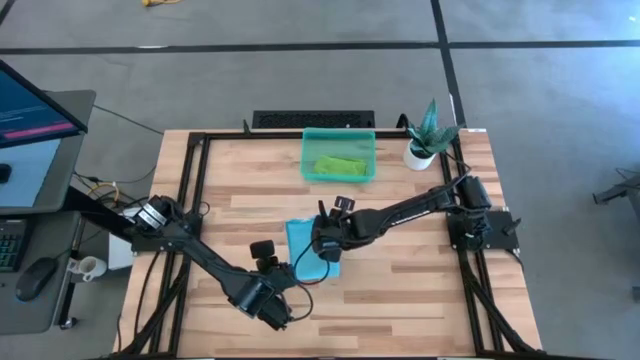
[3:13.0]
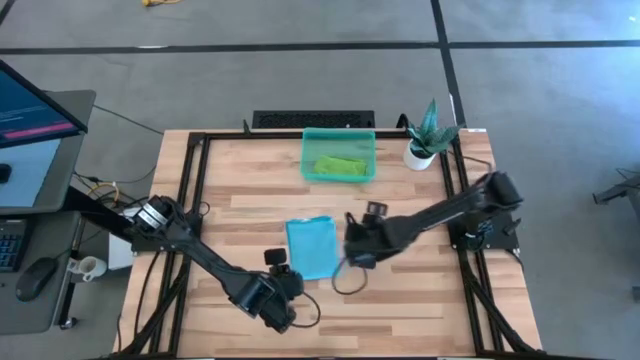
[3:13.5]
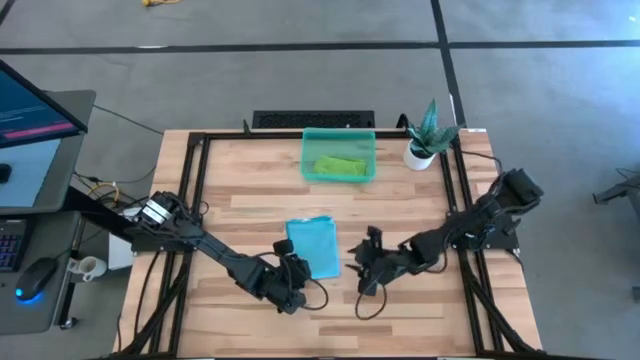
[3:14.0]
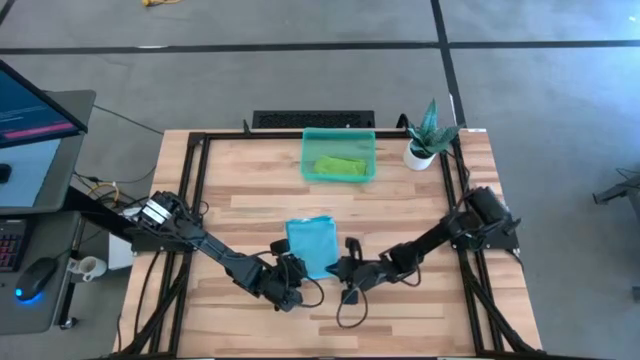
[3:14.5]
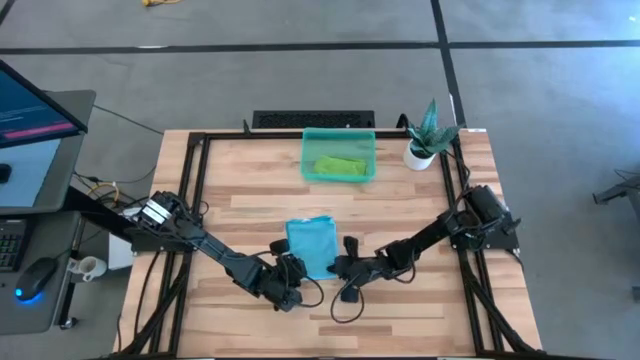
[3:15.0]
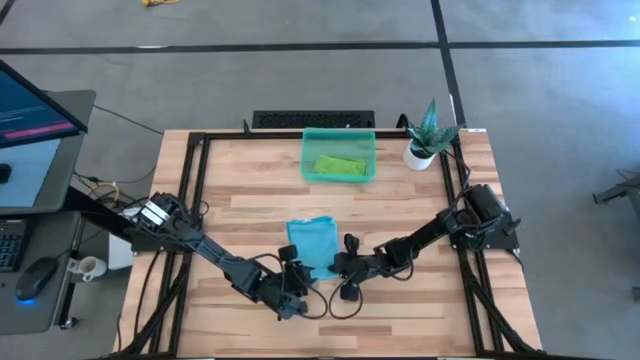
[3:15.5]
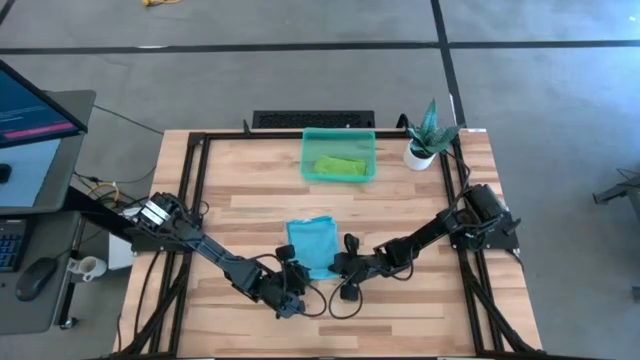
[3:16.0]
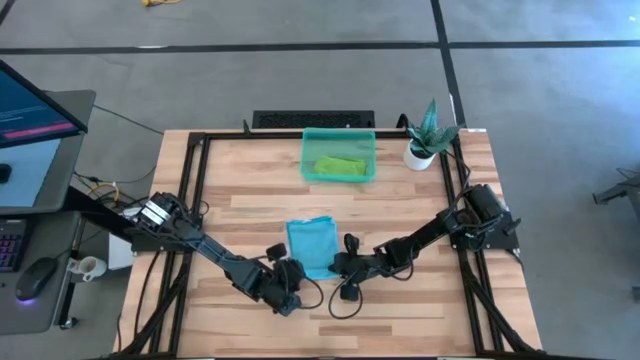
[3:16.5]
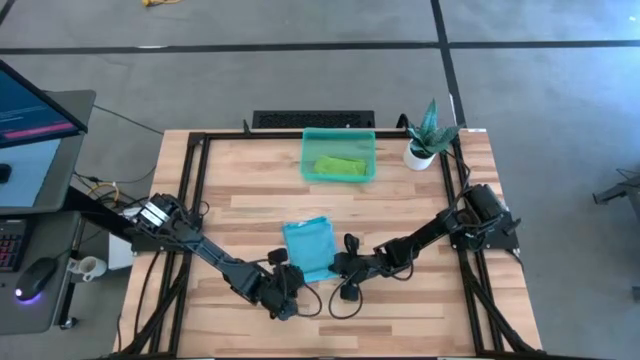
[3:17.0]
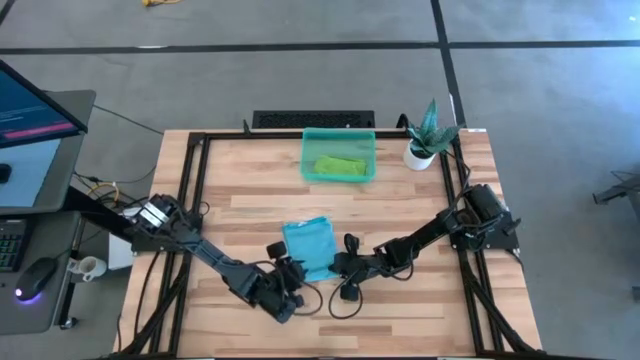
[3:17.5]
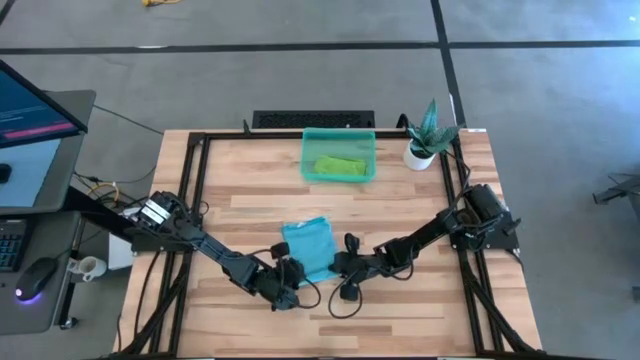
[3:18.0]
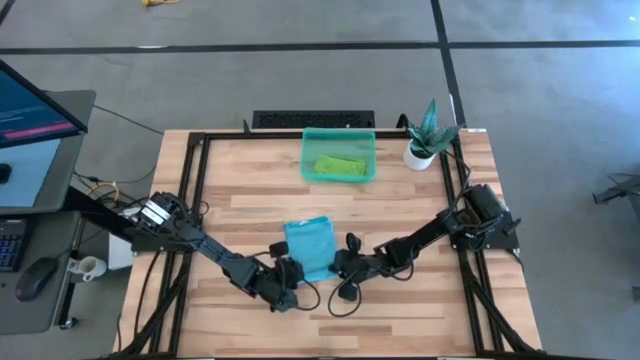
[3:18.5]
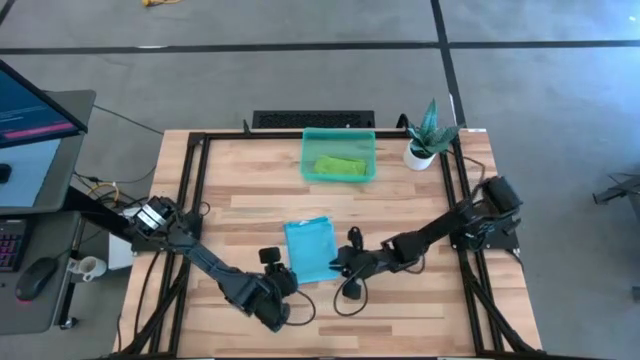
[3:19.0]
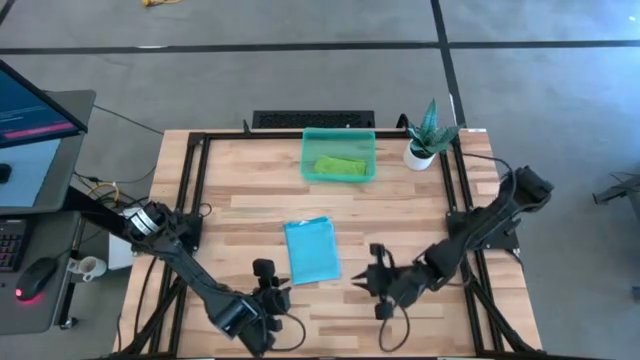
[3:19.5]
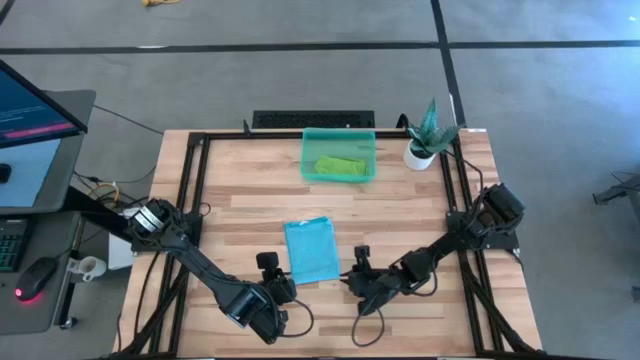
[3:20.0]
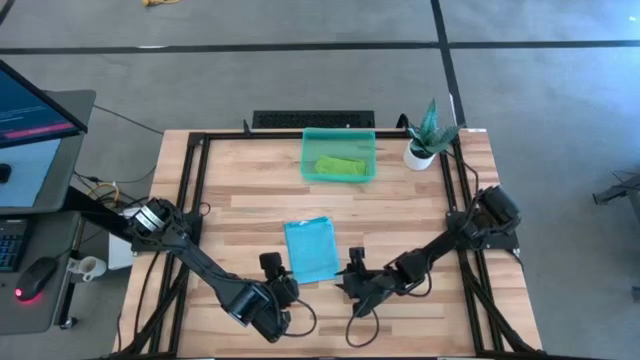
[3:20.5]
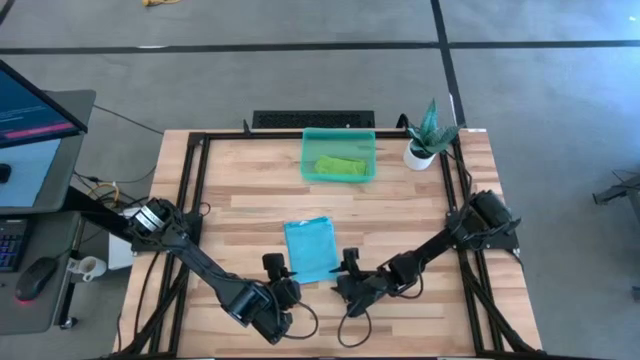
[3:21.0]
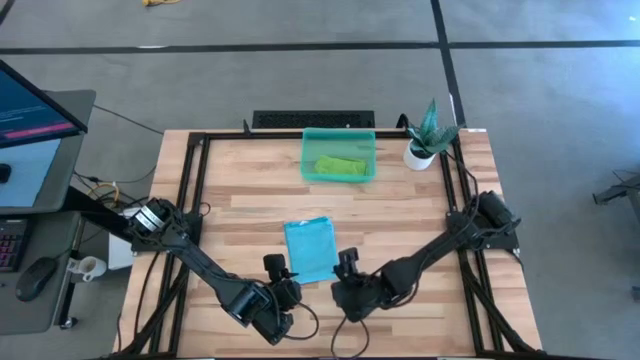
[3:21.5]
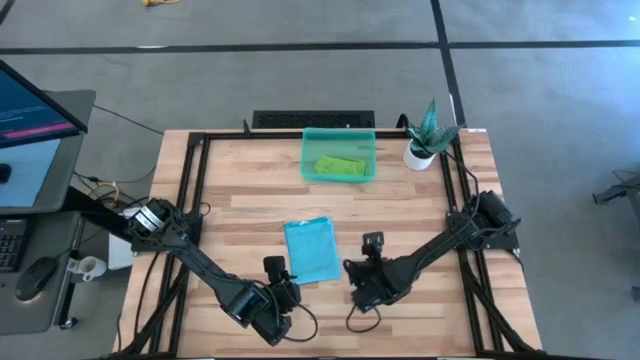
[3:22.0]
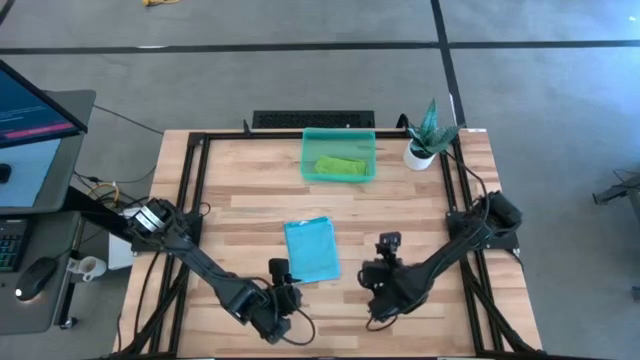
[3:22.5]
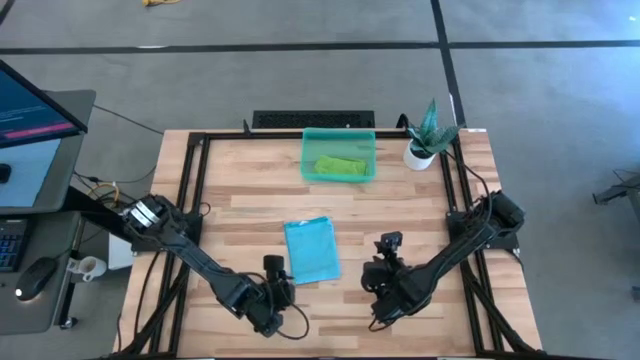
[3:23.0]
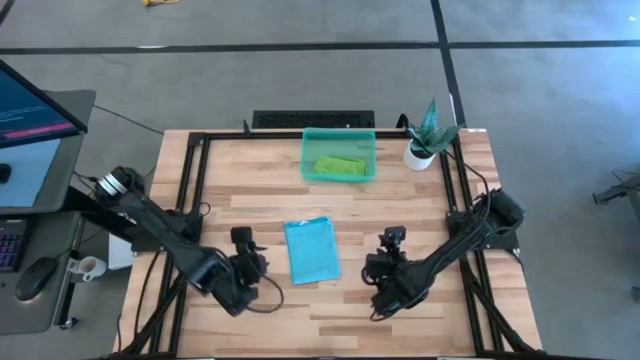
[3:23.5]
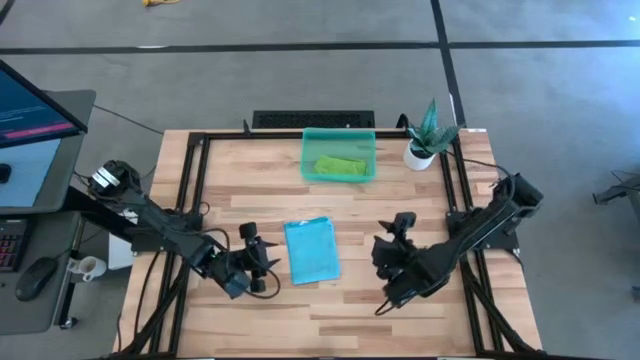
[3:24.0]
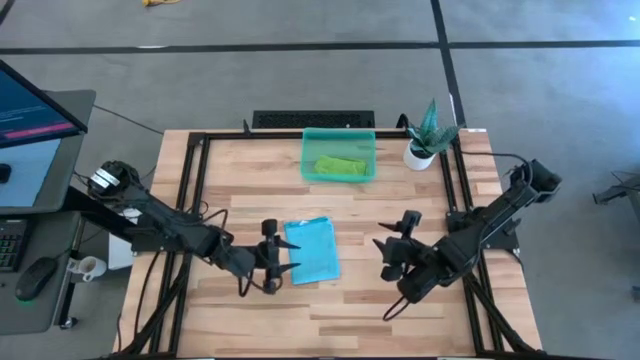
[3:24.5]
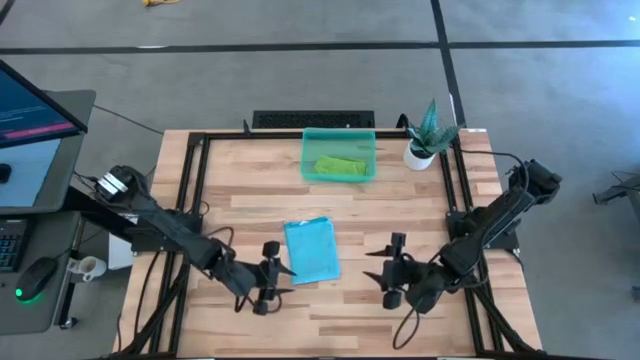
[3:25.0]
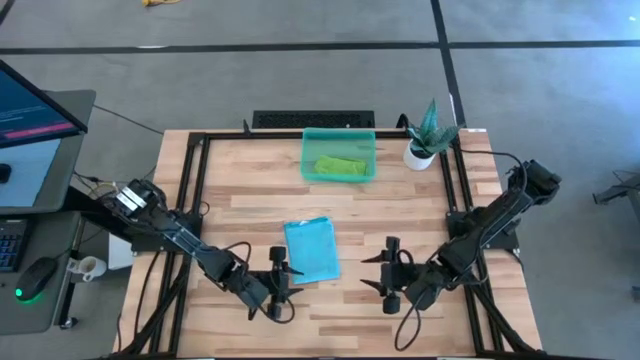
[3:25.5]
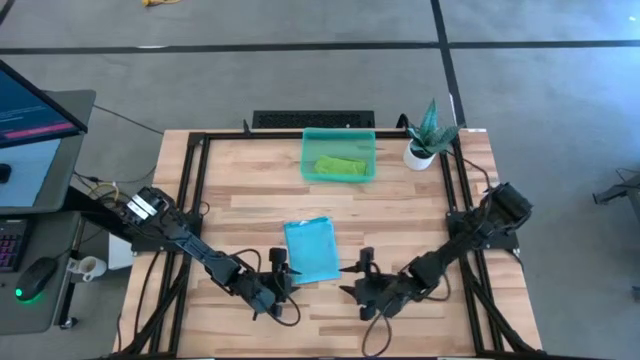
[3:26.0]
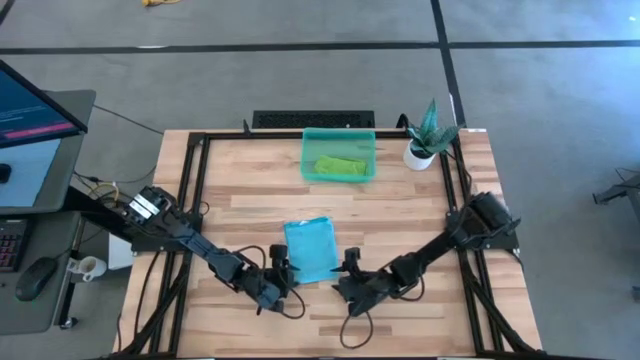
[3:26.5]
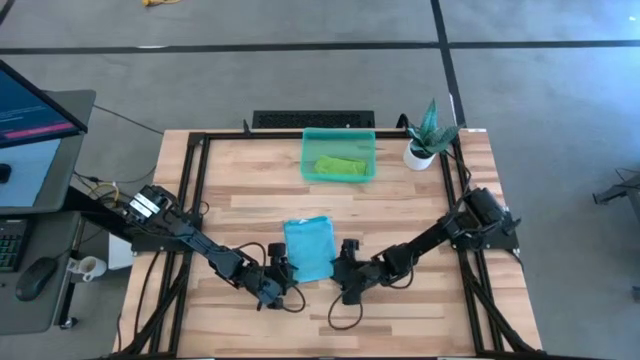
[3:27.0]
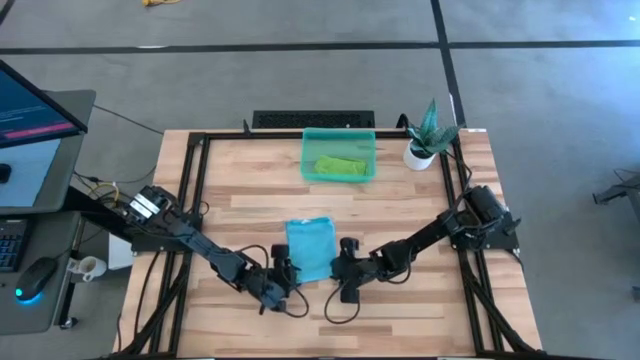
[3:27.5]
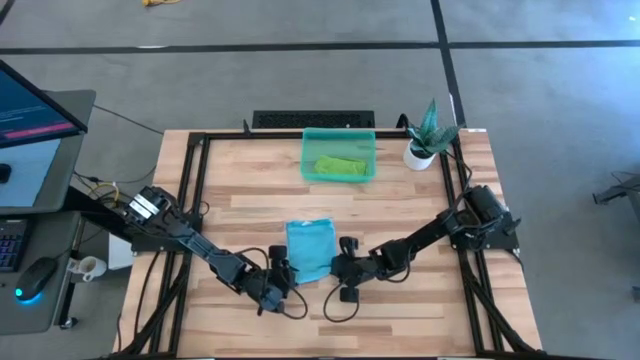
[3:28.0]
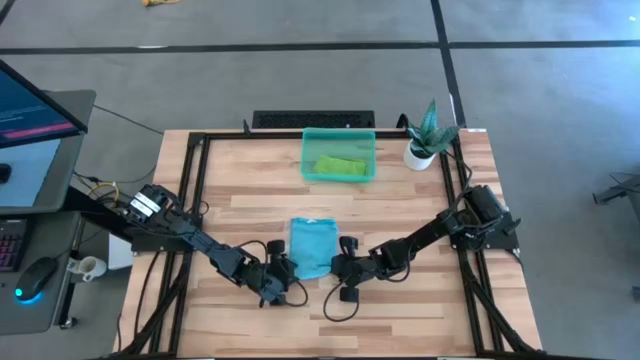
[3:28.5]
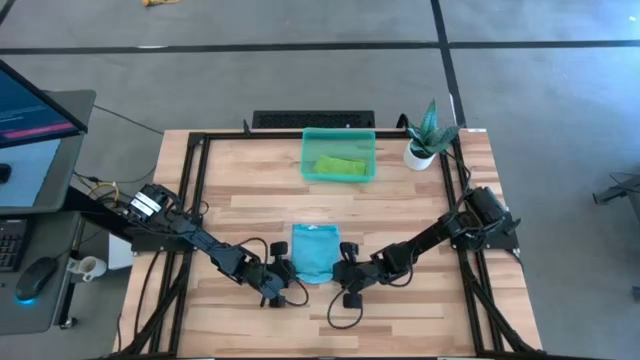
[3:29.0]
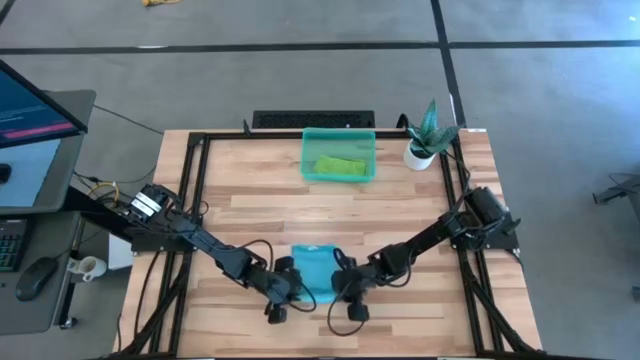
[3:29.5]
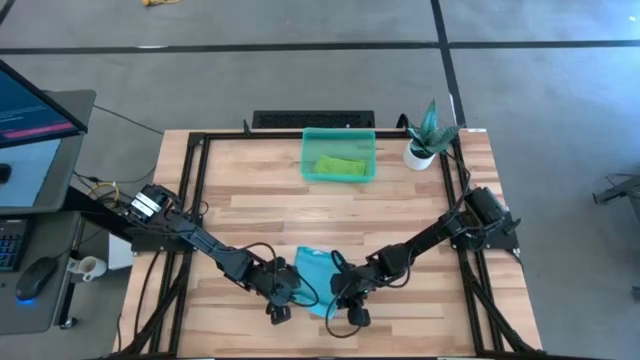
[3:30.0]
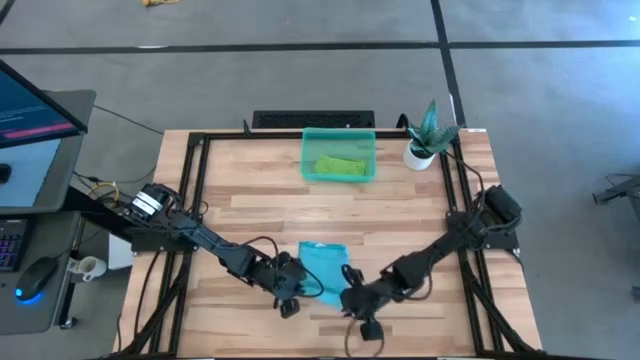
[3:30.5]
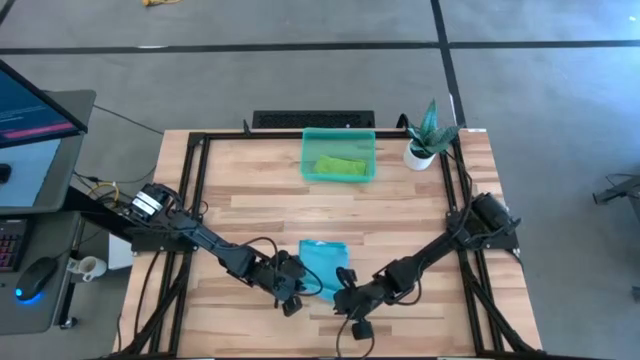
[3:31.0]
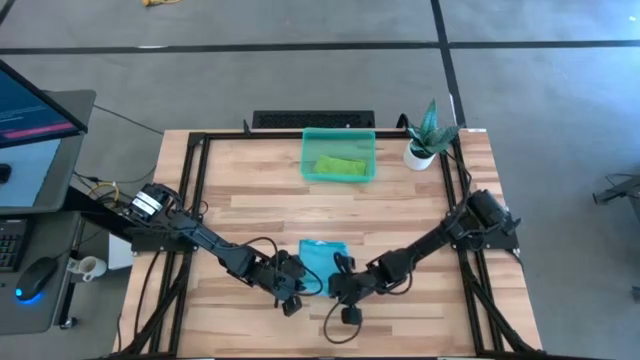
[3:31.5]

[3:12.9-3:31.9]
Task: Roll microfiber towels into tight, uniform cylinder then place into a basket
Roll the blue microfiber cloth

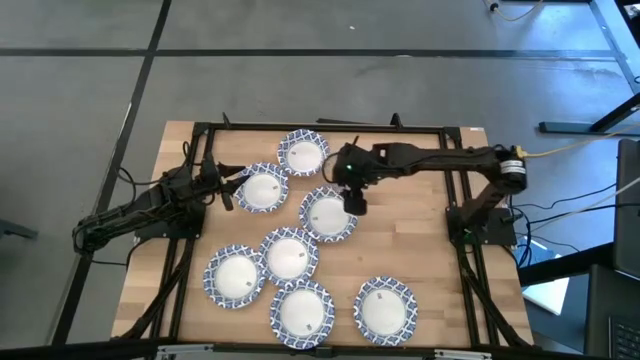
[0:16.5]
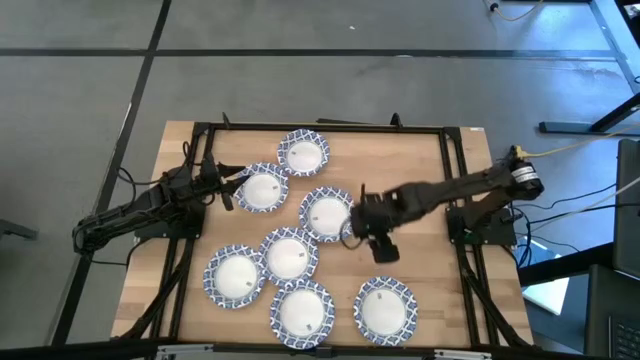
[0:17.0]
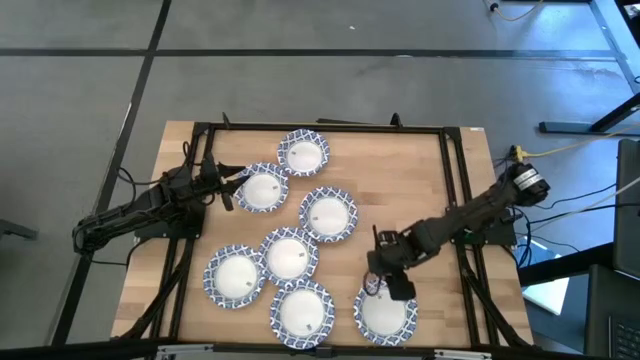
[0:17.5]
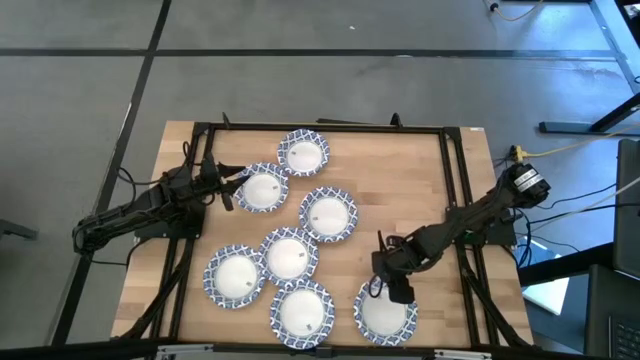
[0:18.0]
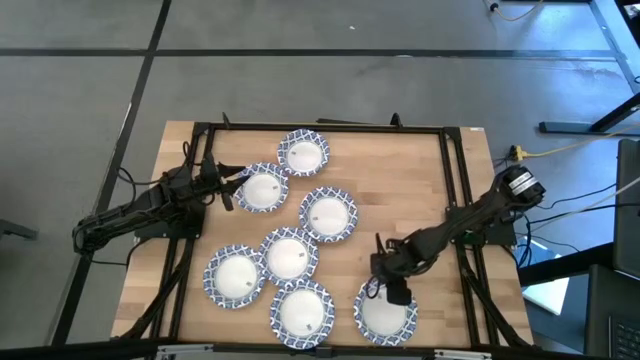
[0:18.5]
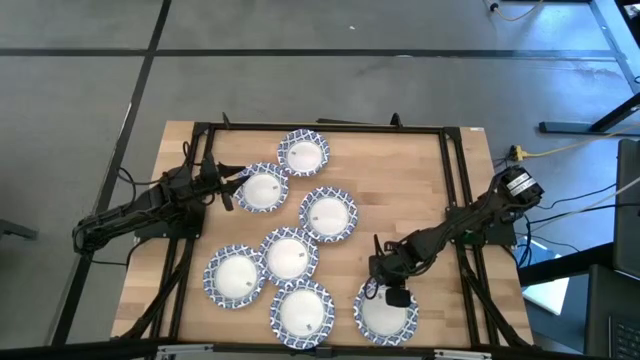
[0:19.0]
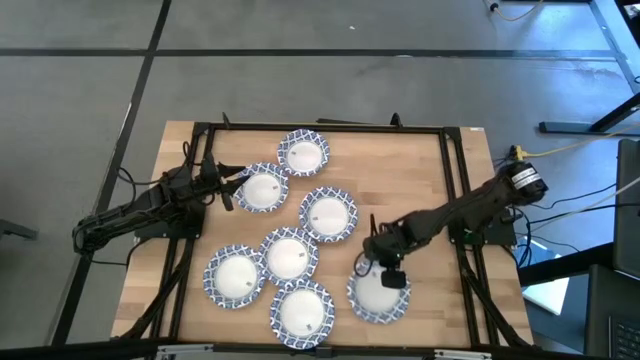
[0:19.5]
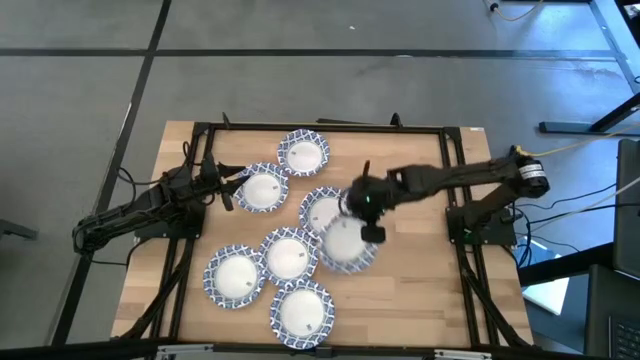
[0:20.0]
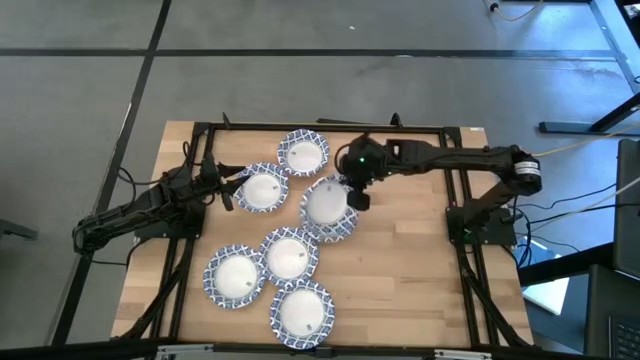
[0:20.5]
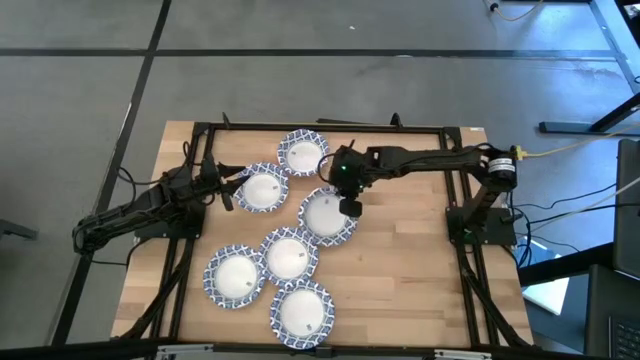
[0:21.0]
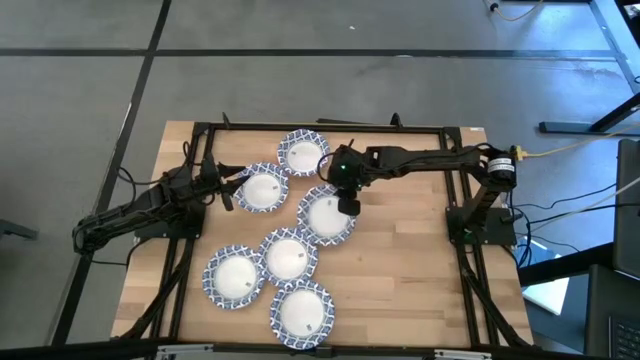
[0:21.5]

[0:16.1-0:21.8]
Task: Nest bowls inside each other
Stack the blue patterned bowl on the stacked blue patterned bowls
